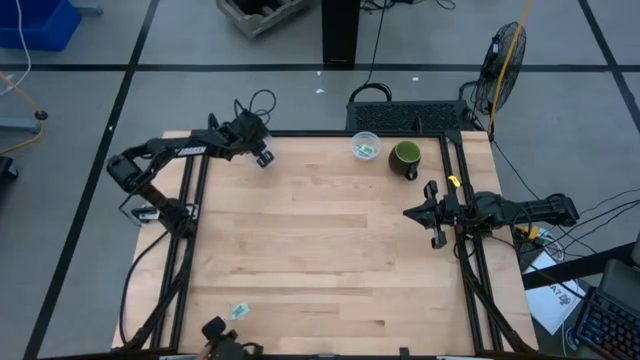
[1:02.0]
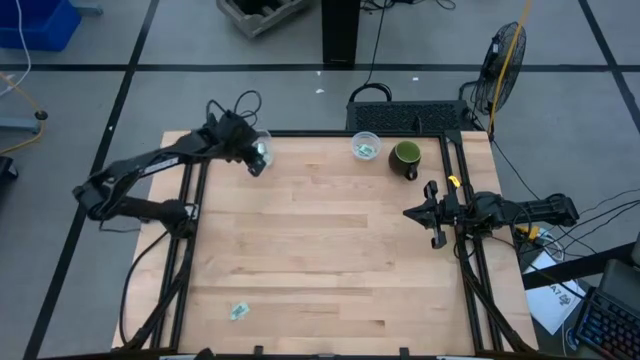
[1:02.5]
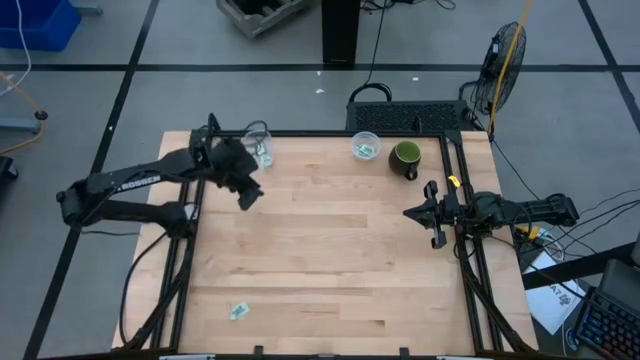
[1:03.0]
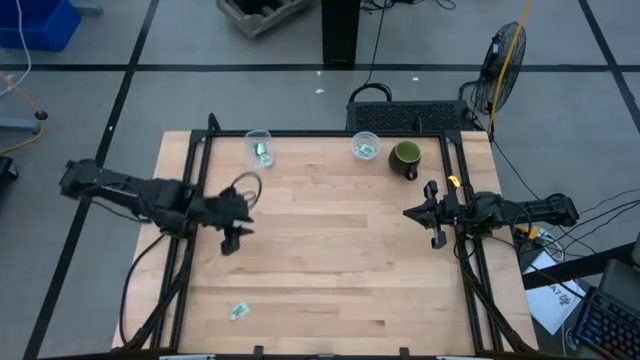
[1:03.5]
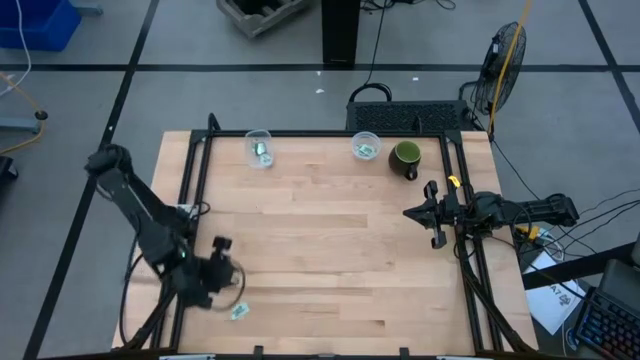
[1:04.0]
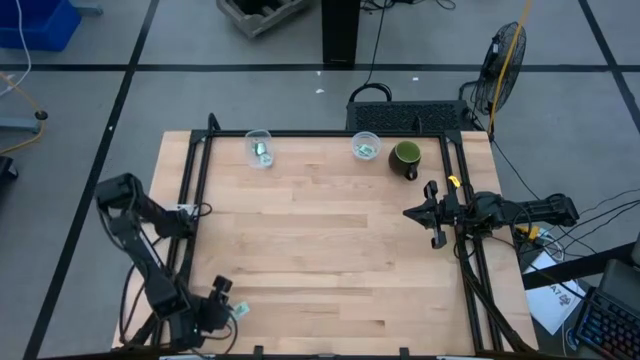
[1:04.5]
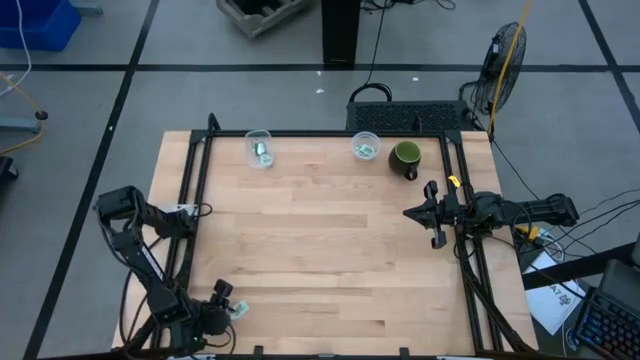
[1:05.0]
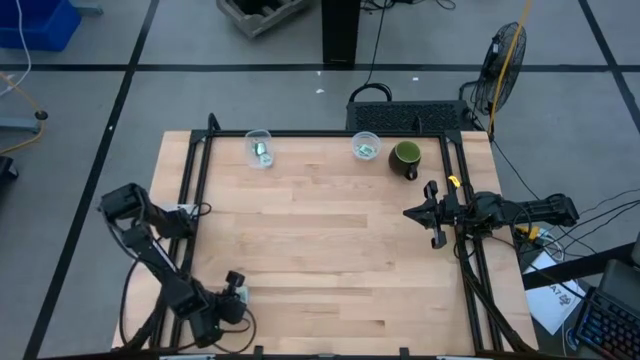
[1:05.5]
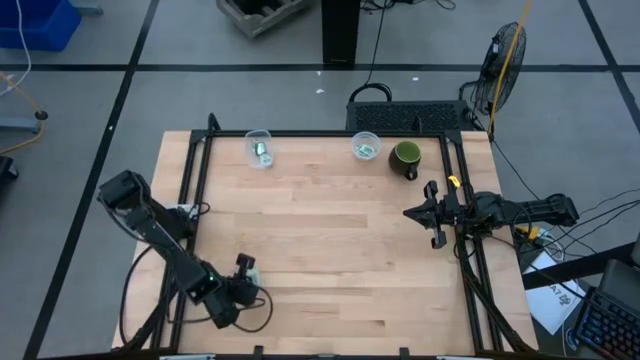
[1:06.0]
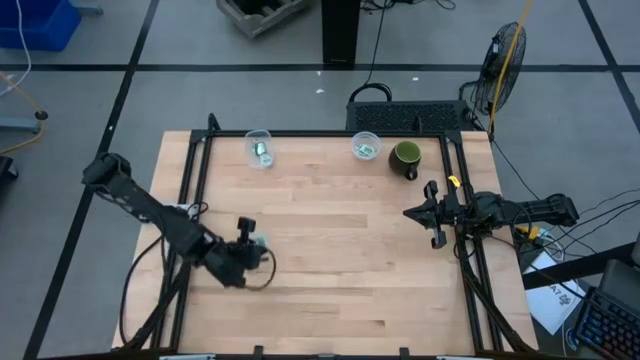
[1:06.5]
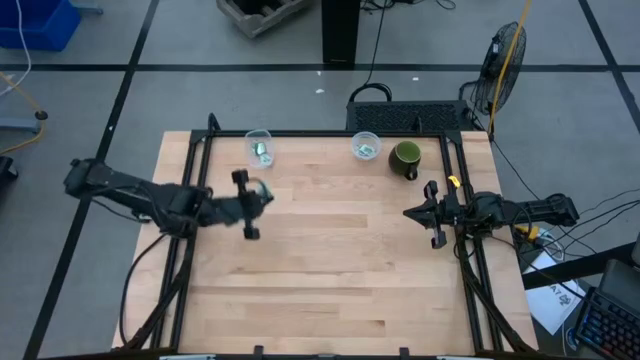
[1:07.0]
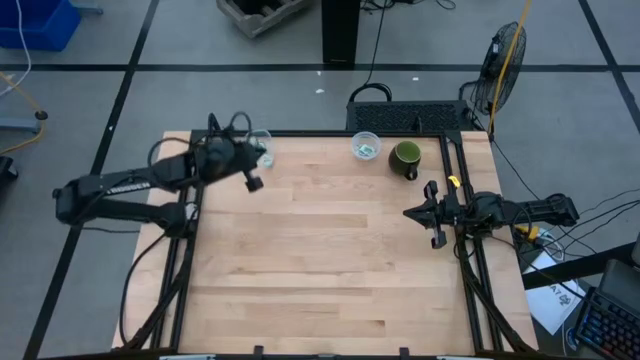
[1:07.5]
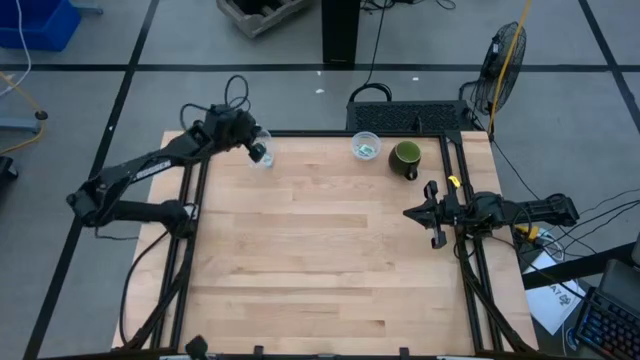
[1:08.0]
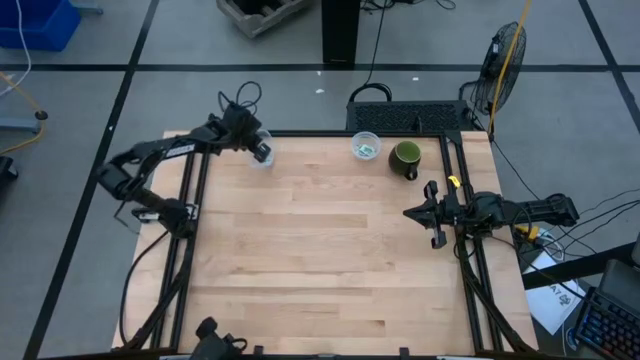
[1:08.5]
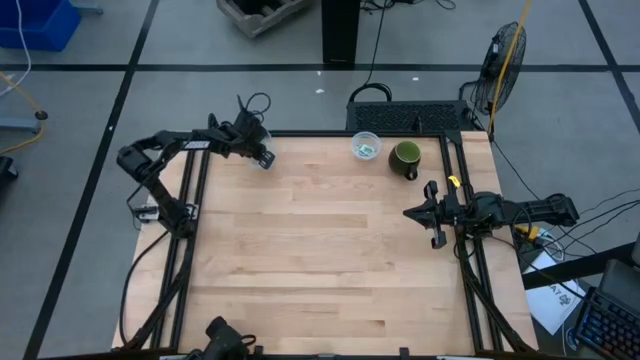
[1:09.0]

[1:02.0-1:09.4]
Task: Pick and place items into bin
Put the green stevia packet into the left transparent bin

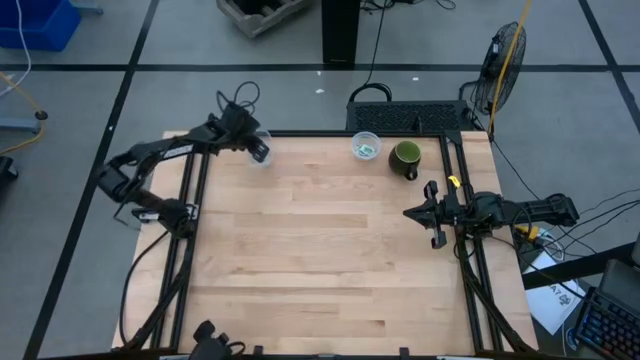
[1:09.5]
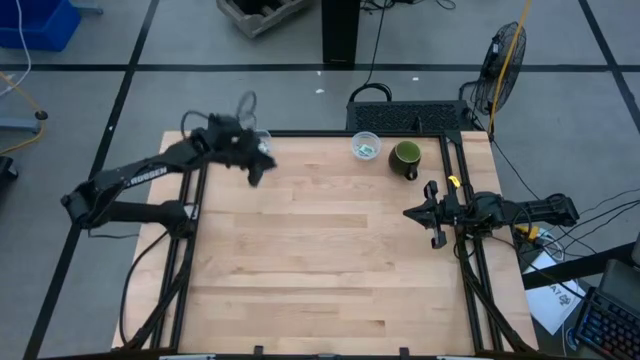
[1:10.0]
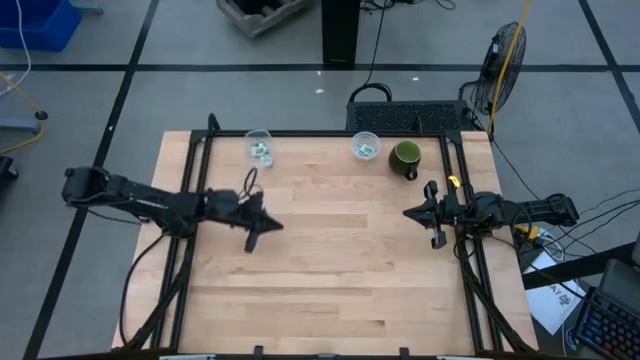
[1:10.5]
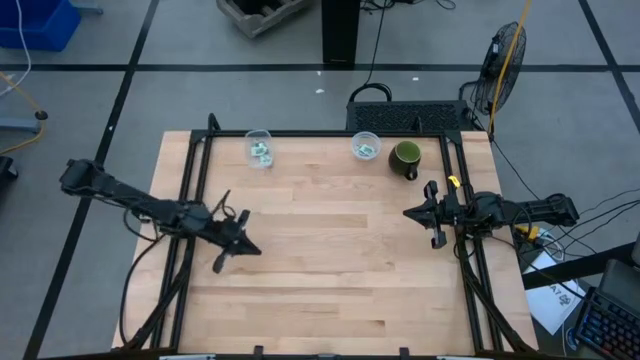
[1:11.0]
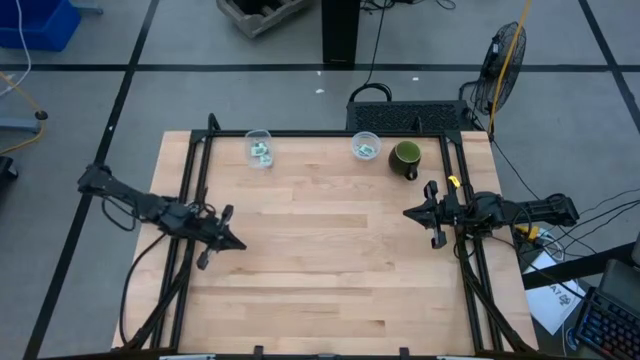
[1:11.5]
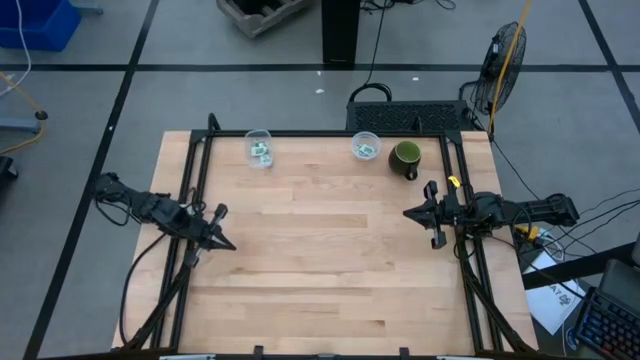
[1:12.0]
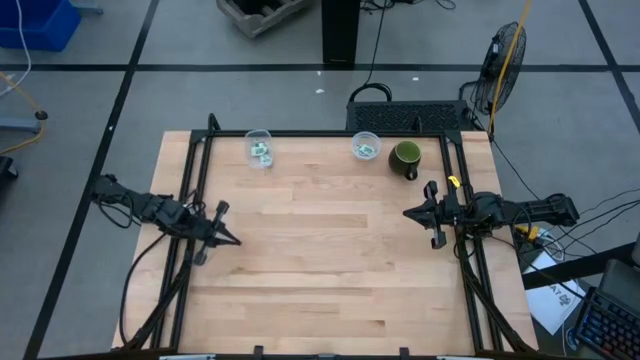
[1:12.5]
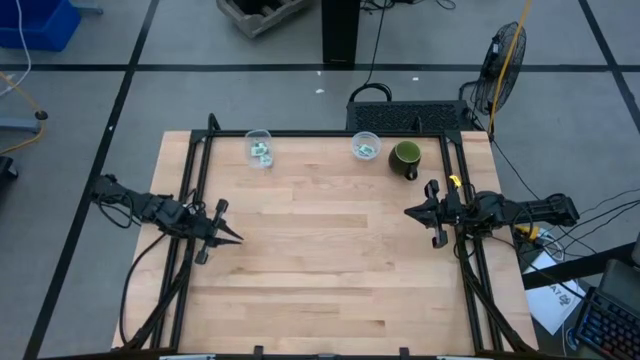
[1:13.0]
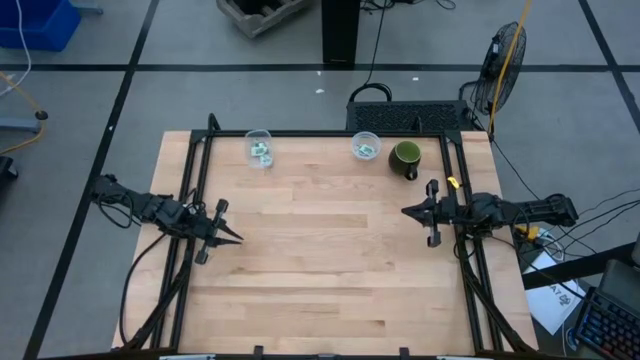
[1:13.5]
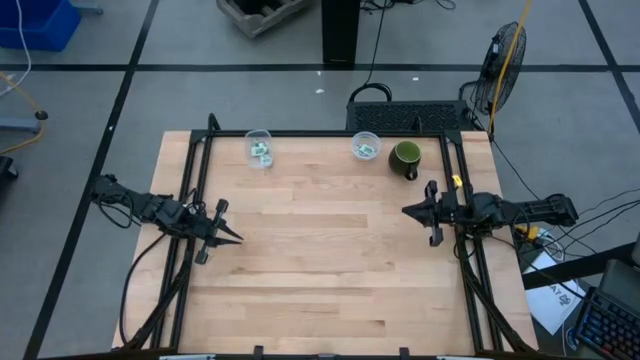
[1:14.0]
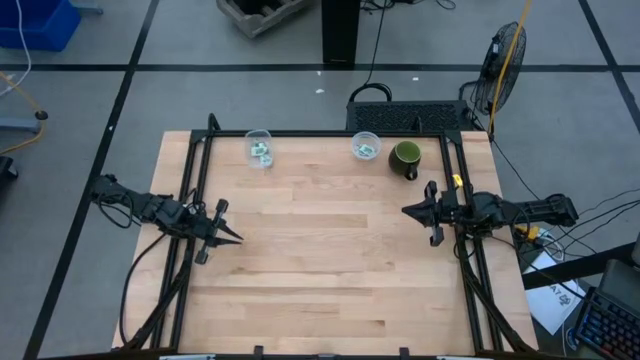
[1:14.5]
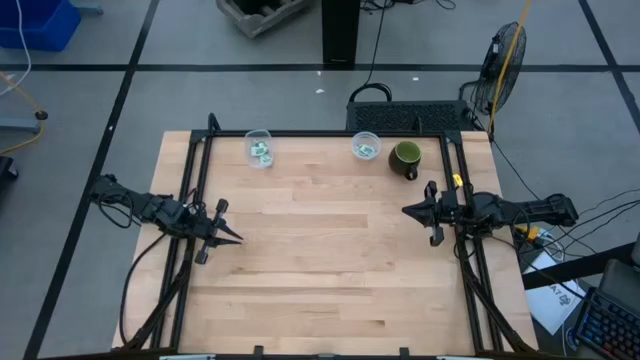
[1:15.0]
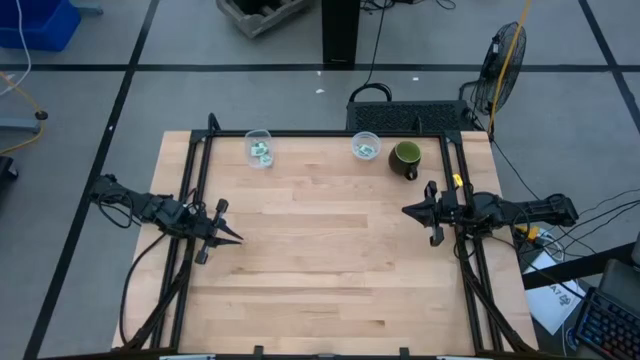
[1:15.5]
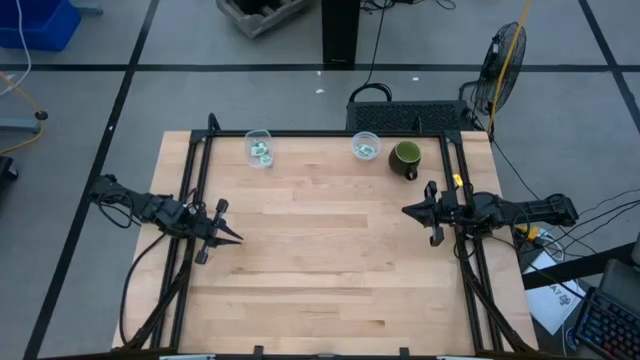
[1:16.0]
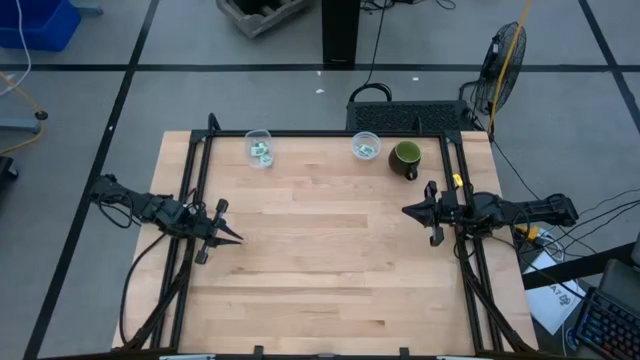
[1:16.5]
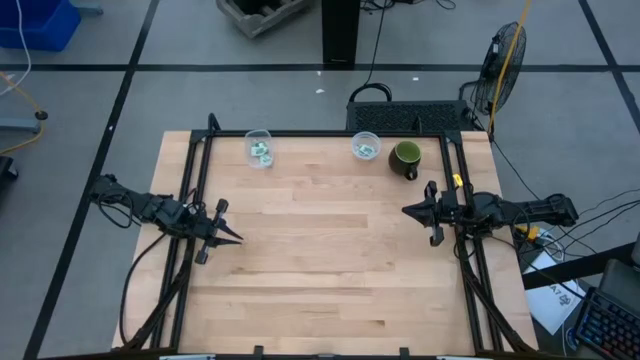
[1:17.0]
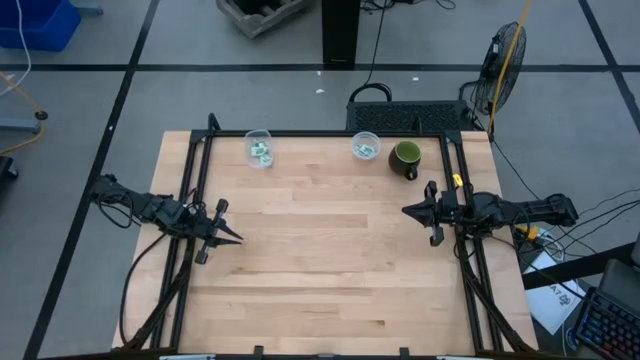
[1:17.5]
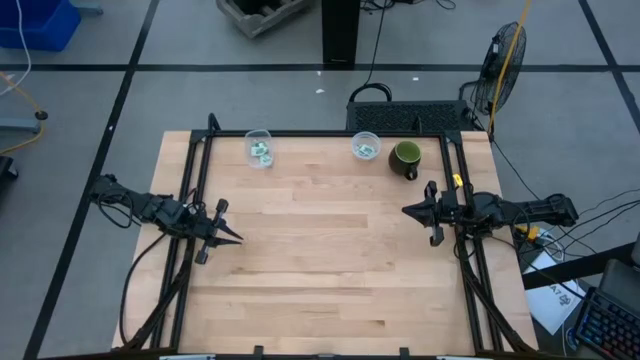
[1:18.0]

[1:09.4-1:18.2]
Return to Home Position

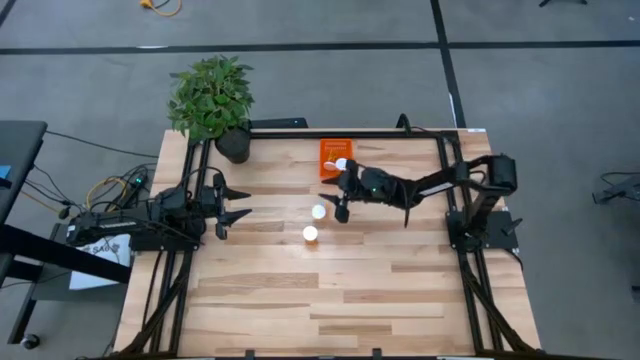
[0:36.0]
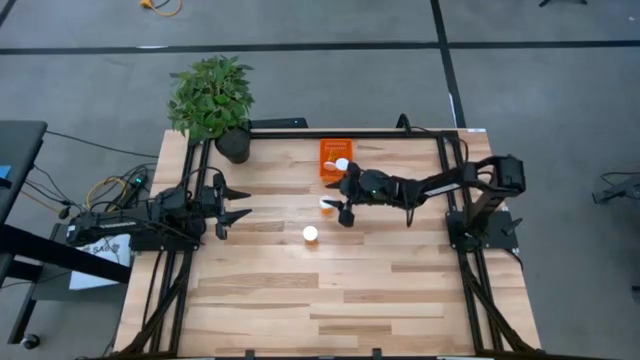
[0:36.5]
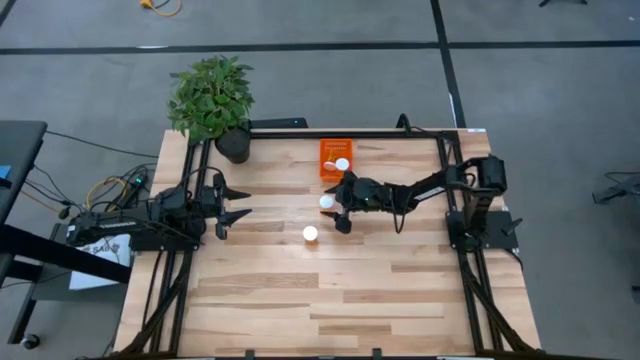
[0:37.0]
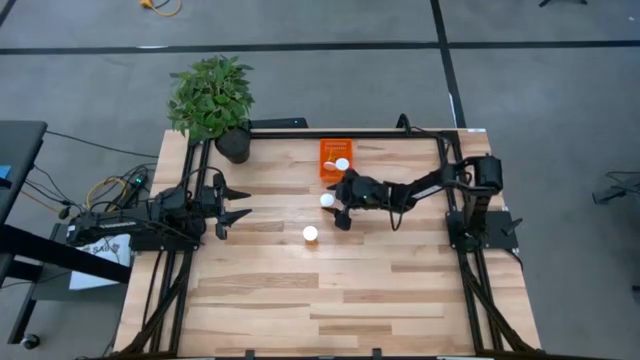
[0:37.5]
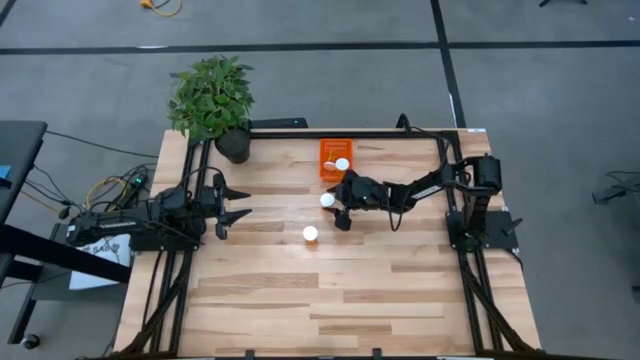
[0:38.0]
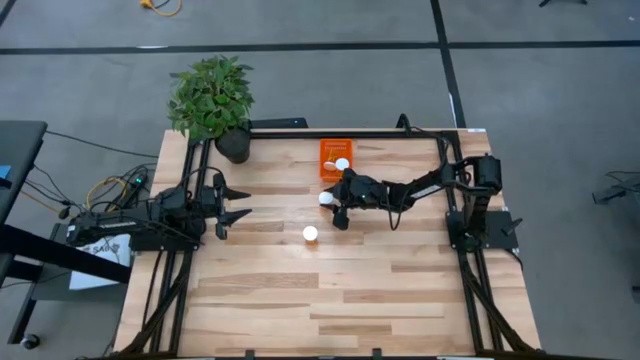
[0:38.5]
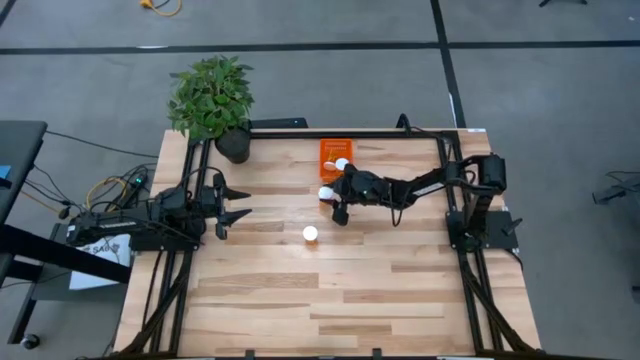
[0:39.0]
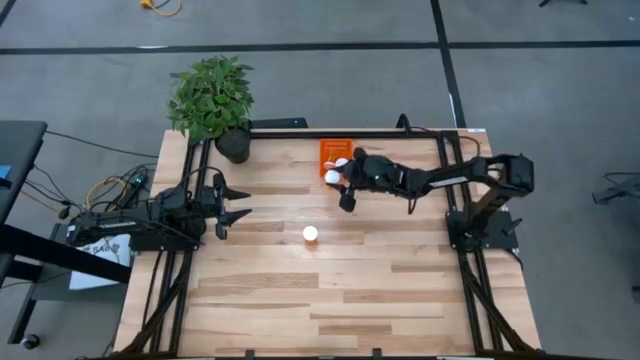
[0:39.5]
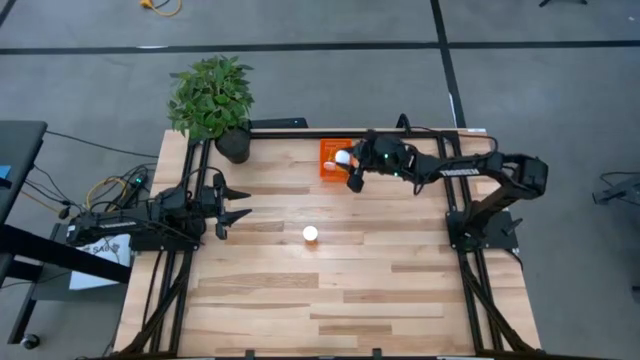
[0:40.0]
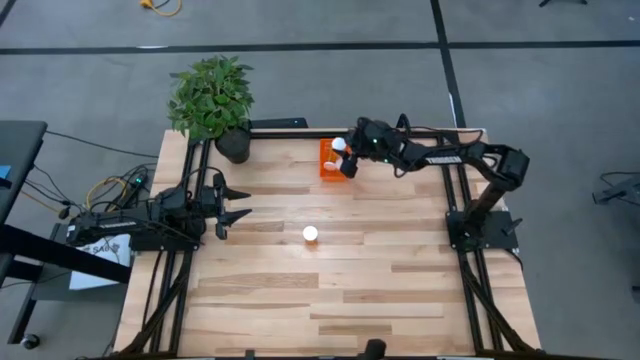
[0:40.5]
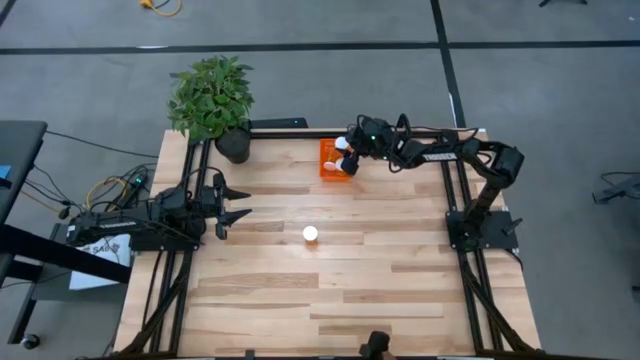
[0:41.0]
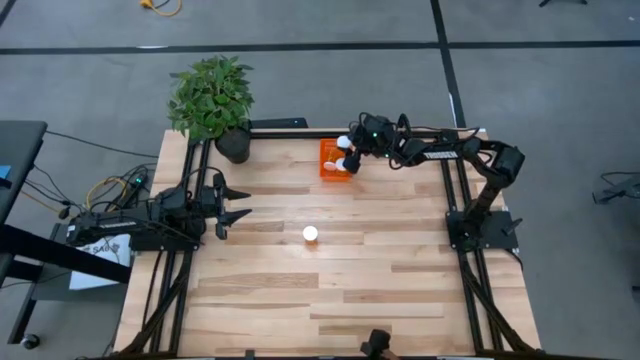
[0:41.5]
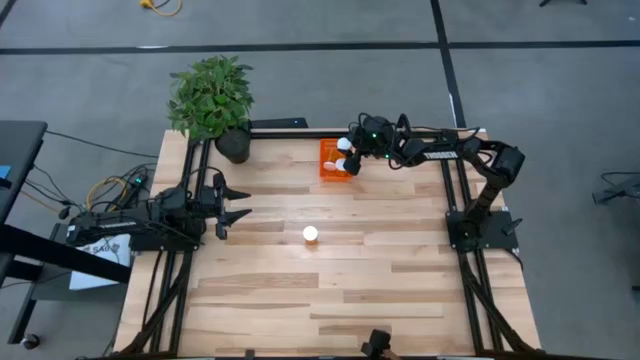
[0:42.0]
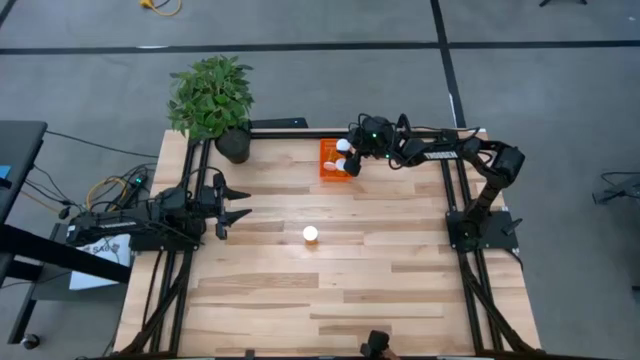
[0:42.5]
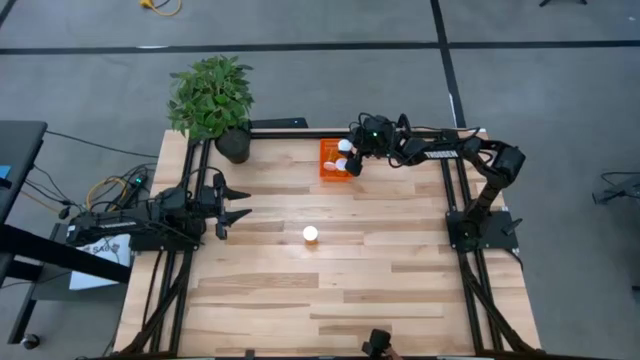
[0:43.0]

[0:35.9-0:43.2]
Task: Pick and place pill bottles into a basket
Put the orange pill bottle into the orange basket
